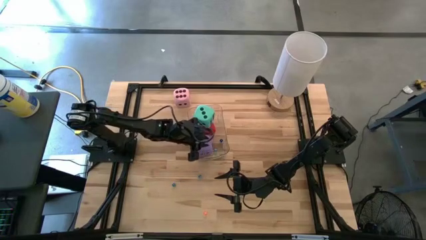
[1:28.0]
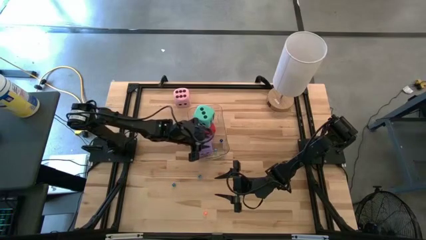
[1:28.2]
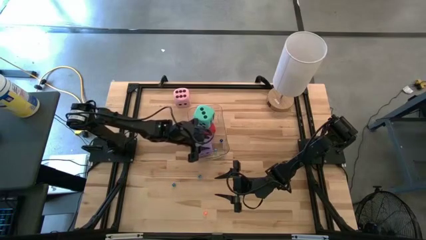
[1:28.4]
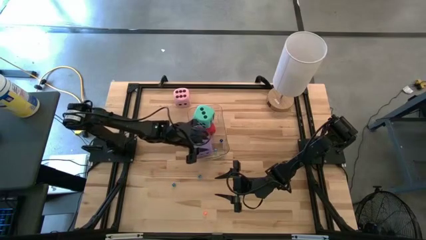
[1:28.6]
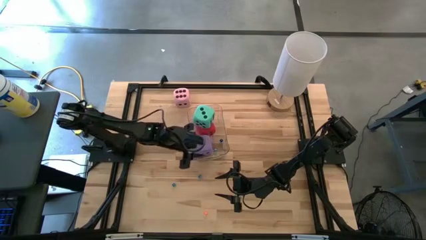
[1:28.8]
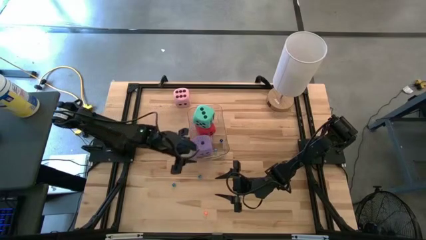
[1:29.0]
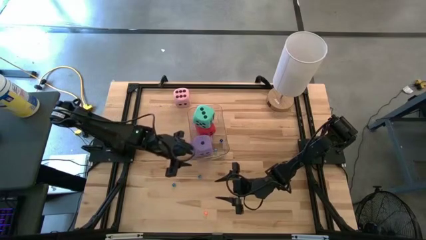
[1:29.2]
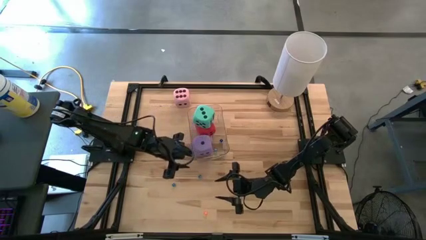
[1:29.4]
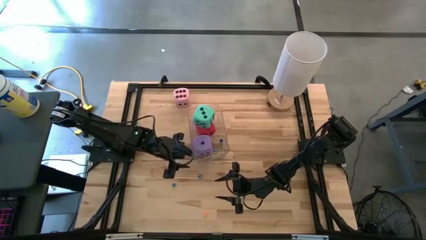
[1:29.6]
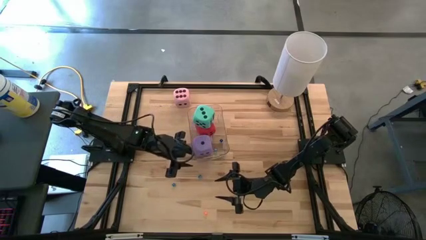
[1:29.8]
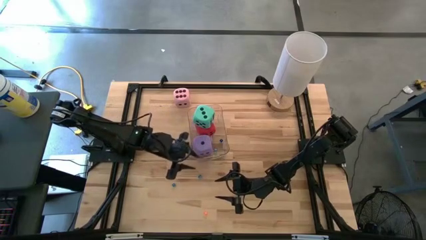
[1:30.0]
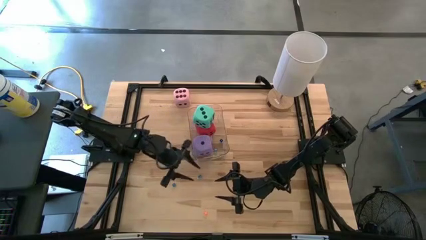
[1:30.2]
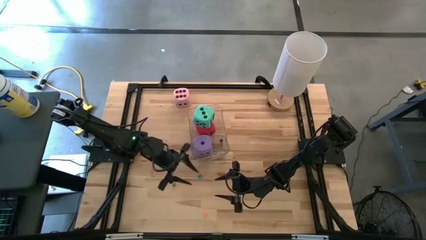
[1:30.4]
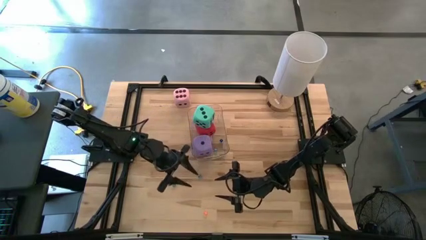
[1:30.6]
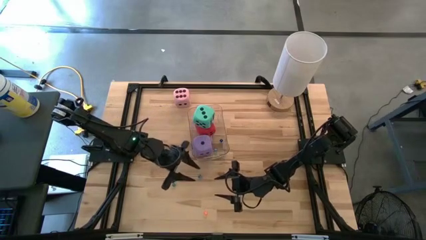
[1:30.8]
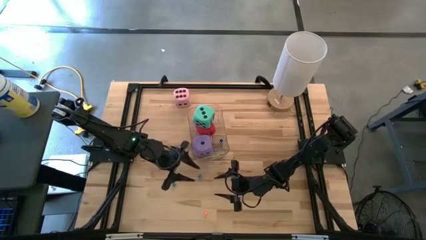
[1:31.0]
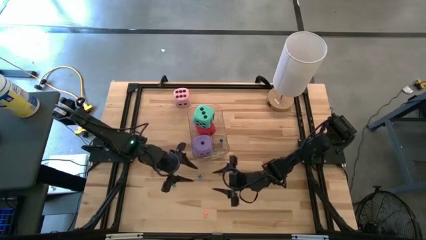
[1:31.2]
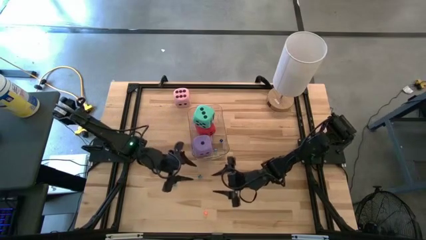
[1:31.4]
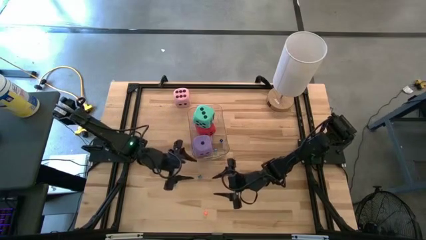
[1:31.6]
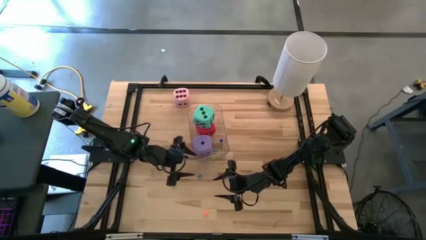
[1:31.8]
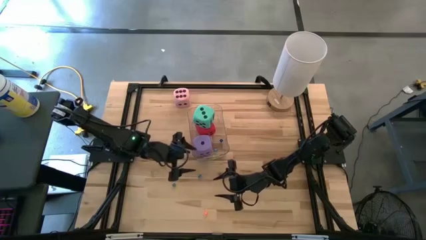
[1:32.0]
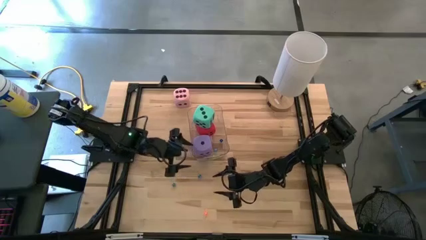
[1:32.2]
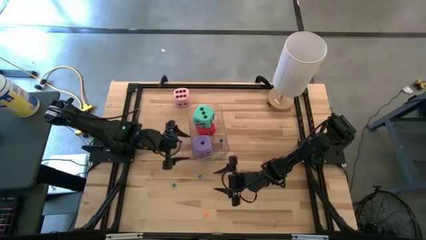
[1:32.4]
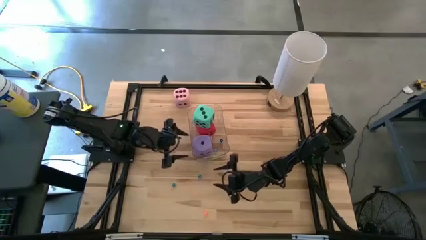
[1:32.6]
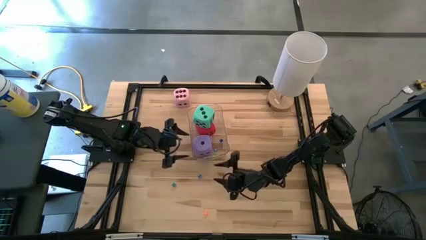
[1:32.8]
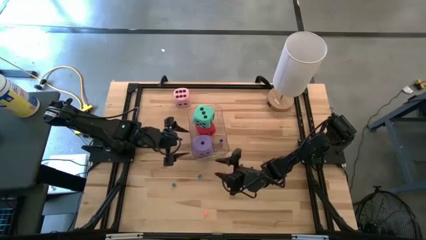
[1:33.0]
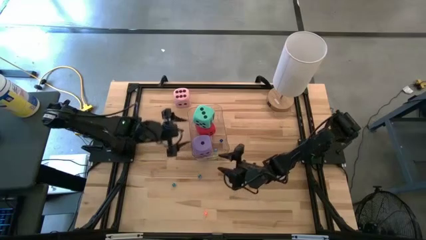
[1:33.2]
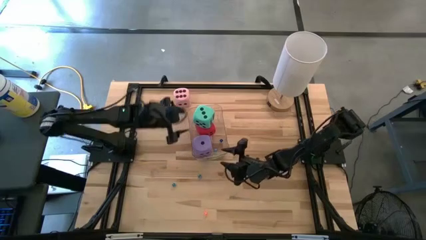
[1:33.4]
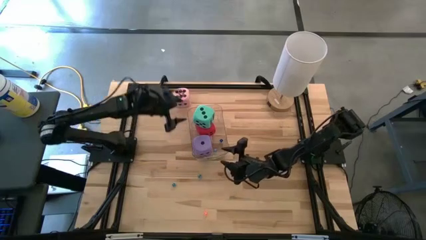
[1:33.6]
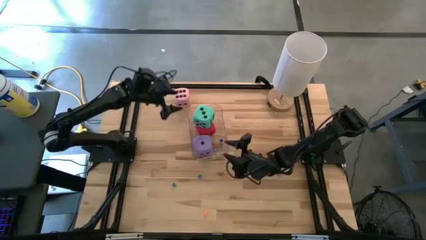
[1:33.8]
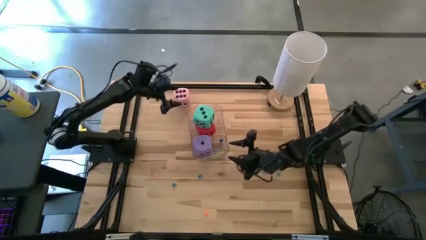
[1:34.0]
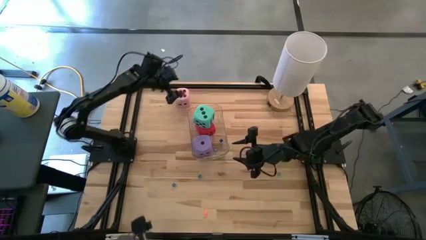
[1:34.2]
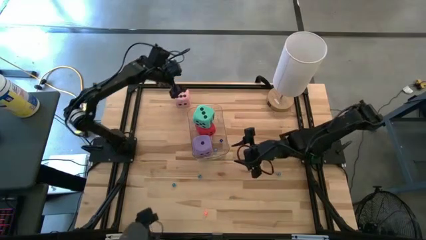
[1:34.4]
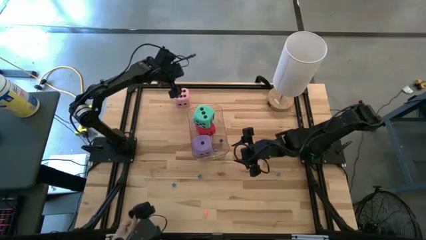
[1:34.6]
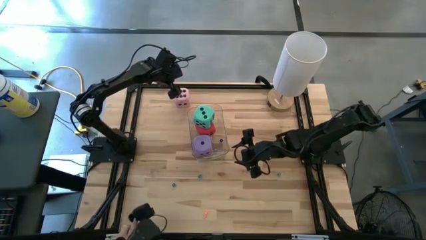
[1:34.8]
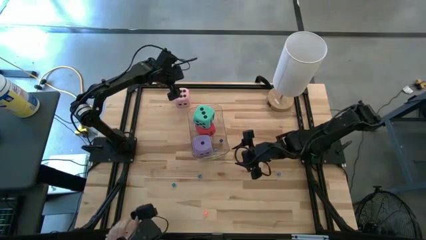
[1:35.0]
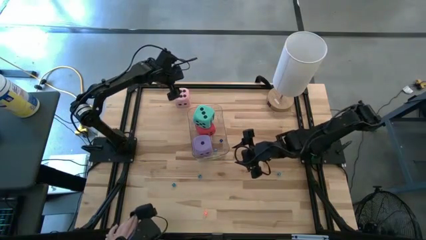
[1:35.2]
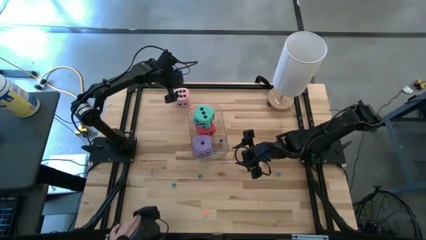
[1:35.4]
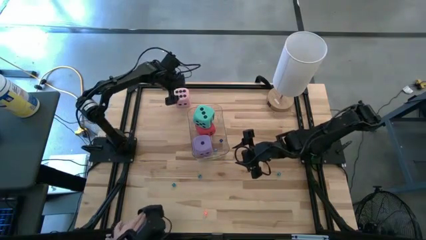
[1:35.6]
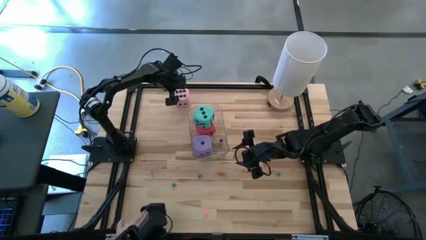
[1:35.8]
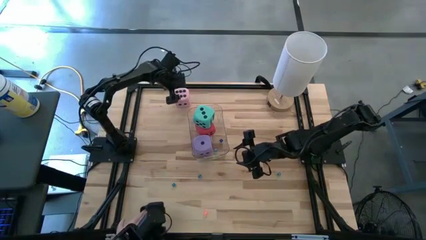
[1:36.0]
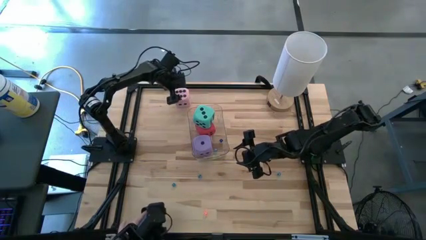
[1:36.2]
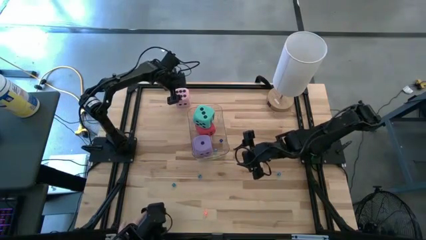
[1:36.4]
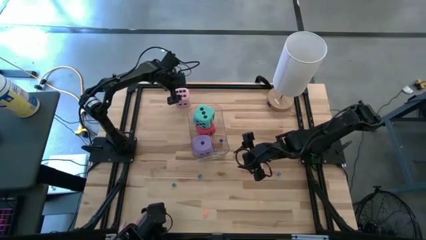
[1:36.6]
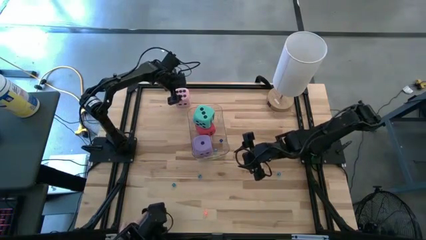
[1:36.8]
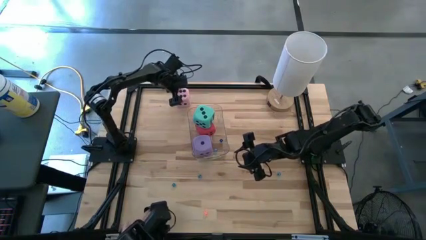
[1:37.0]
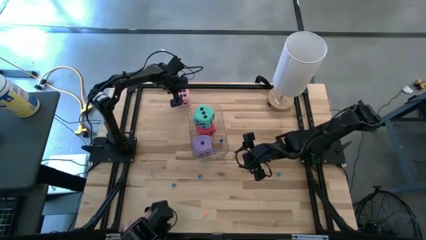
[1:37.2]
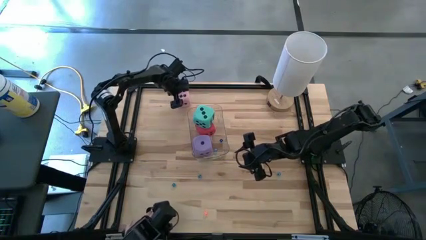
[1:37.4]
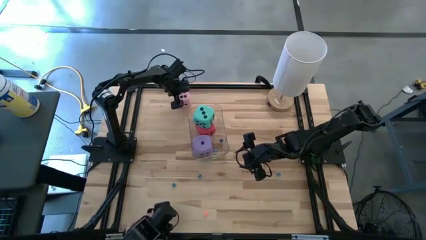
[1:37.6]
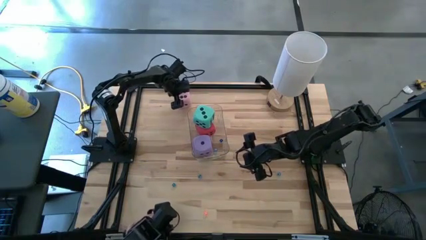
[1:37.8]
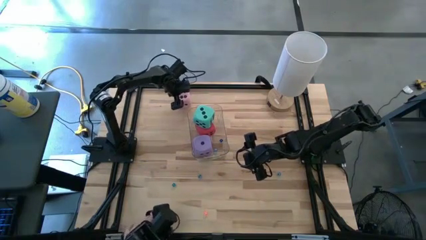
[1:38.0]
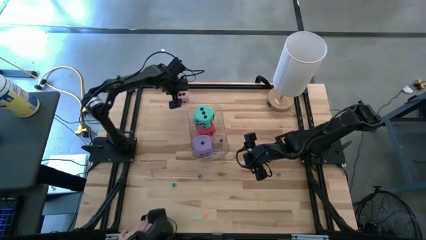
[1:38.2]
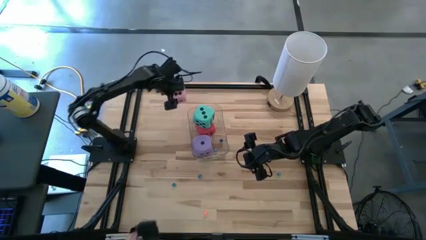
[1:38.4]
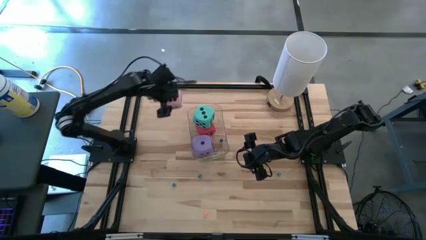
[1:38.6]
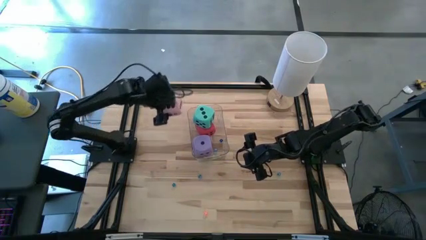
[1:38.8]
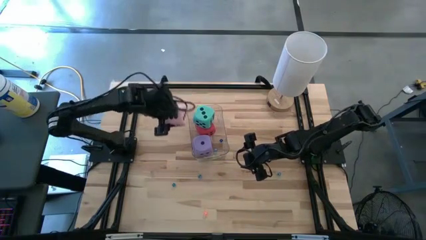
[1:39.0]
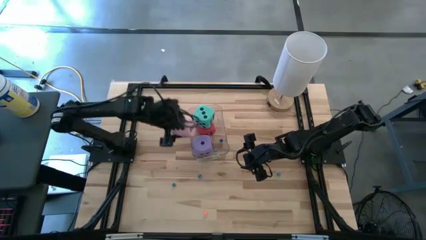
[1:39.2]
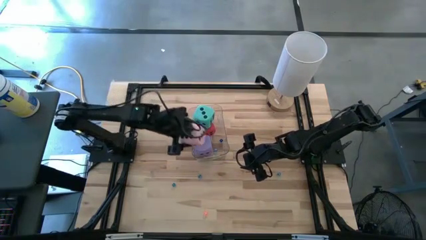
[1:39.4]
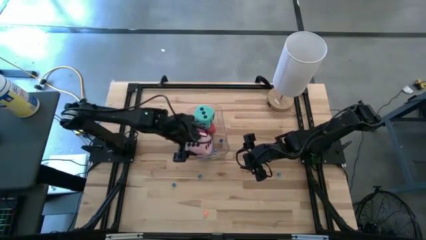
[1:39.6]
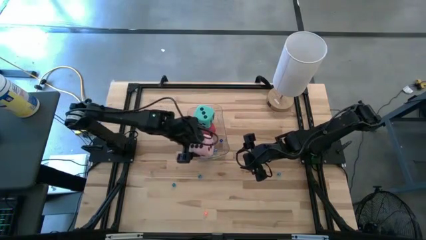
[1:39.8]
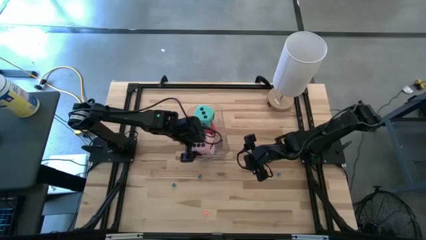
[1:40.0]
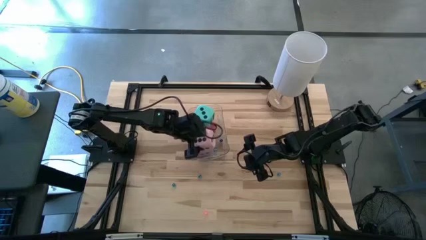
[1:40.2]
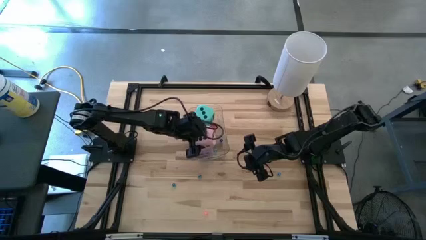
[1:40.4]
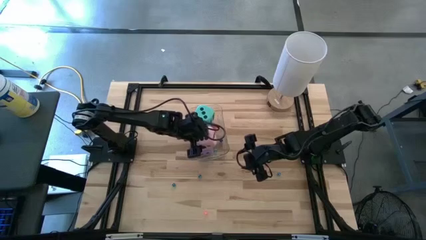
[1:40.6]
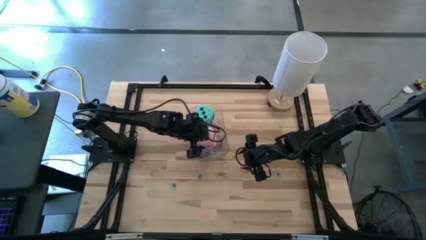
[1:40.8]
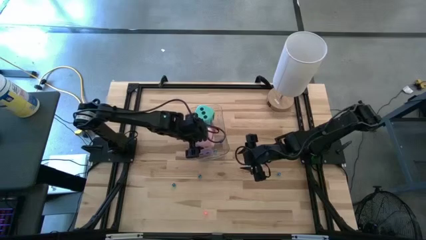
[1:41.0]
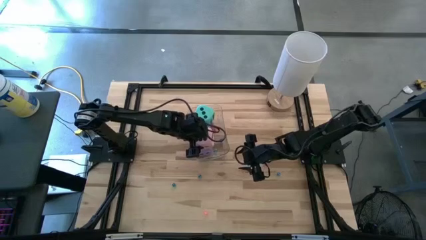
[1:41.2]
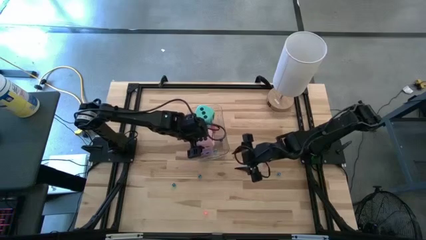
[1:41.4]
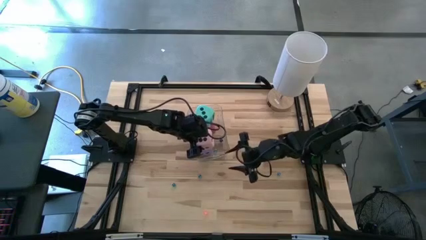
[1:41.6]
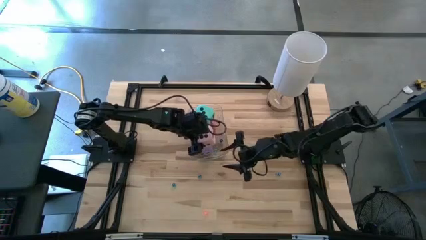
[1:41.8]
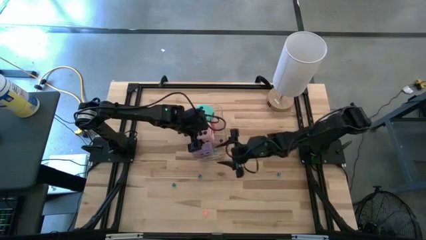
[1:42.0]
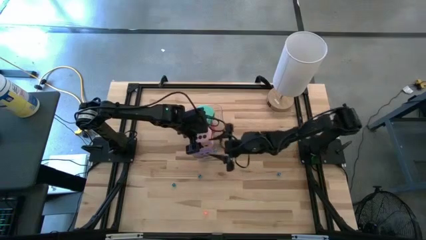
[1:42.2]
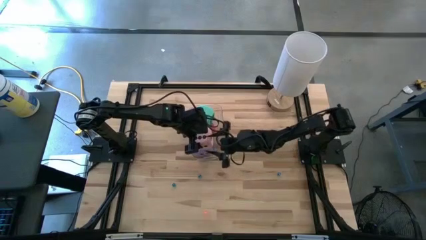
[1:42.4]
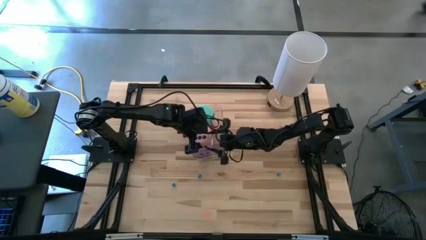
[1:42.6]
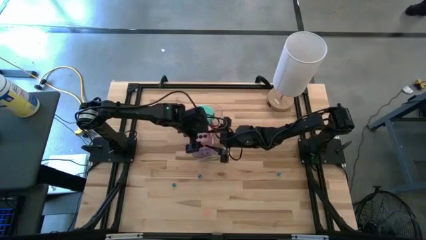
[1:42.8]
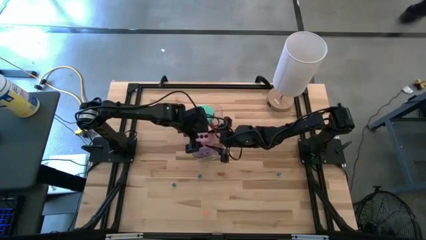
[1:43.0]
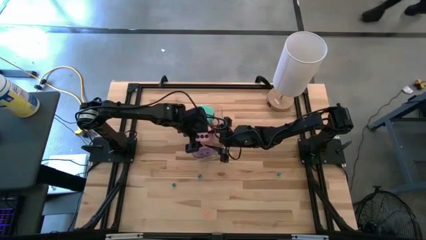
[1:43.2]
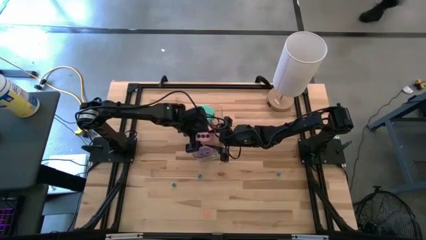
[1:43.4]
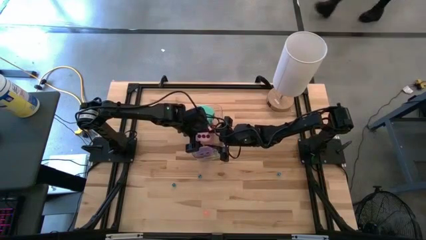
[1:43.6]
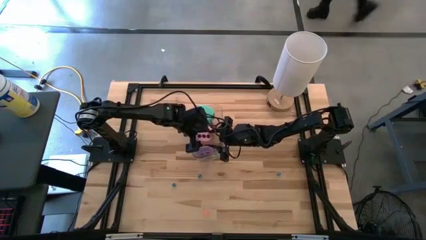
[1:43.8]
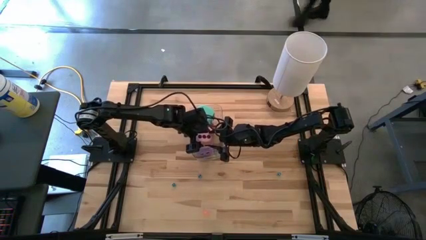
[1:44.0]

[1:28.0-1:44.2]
Task: Pick & Place Dice
Put the large pink die into the transparent bin
